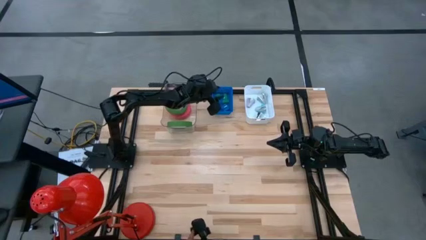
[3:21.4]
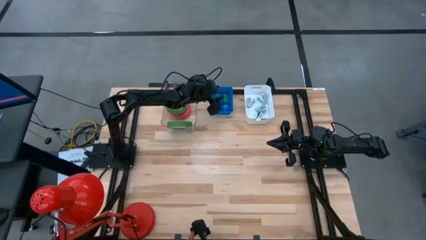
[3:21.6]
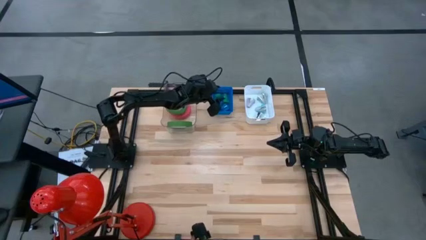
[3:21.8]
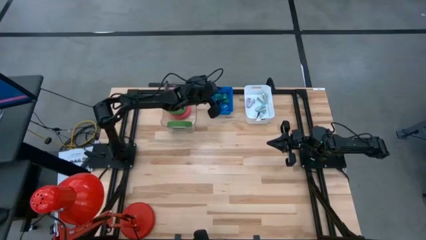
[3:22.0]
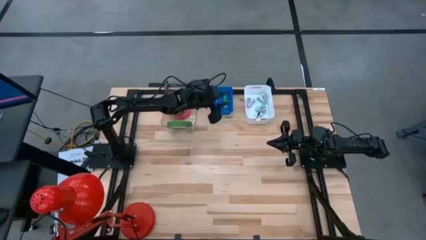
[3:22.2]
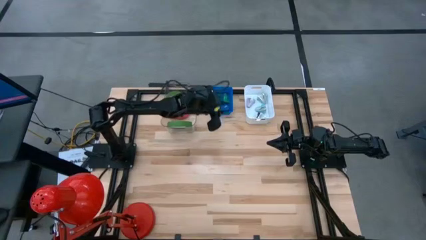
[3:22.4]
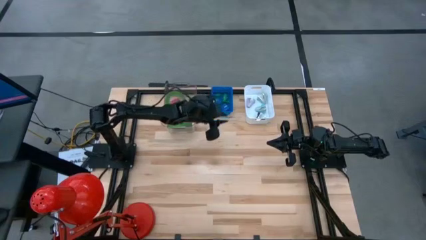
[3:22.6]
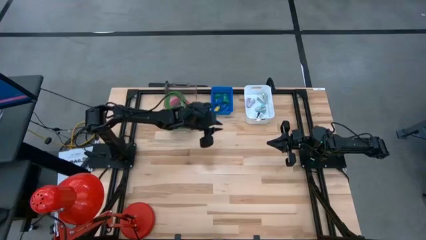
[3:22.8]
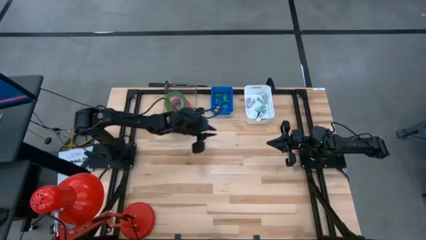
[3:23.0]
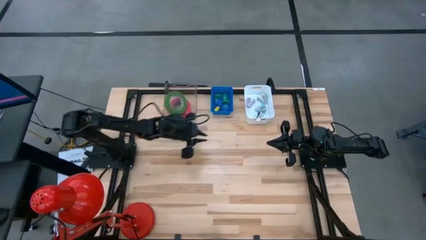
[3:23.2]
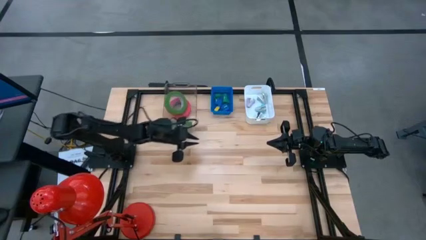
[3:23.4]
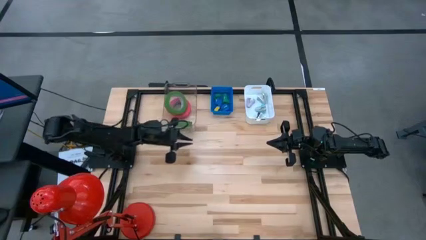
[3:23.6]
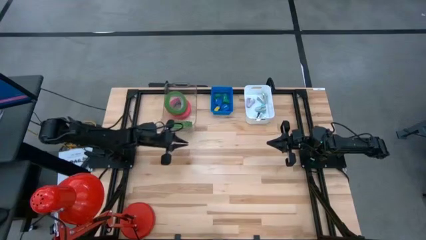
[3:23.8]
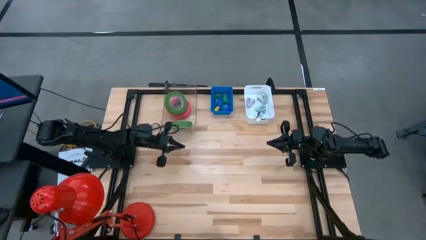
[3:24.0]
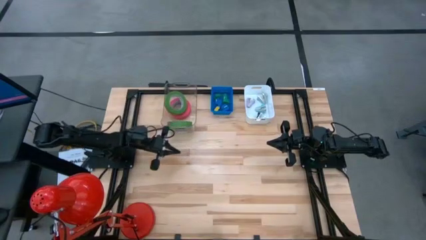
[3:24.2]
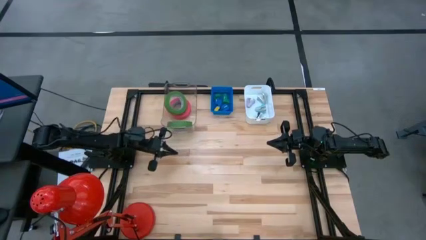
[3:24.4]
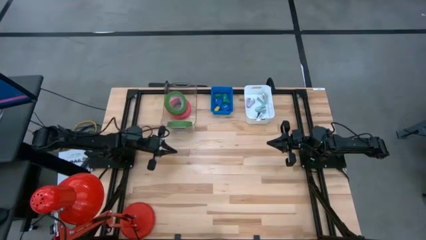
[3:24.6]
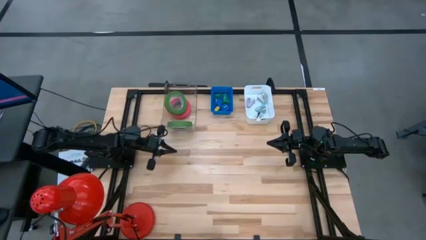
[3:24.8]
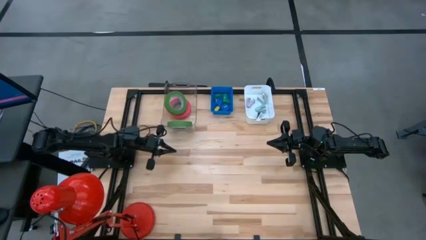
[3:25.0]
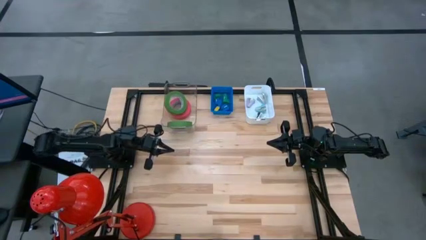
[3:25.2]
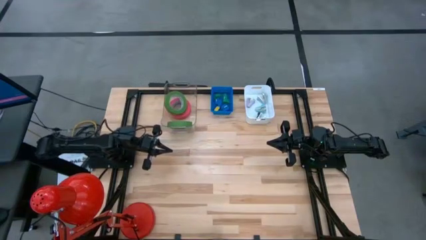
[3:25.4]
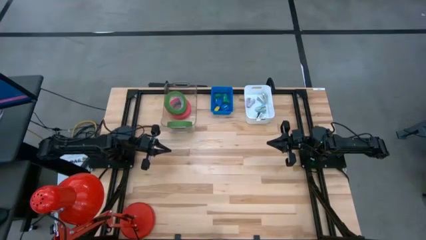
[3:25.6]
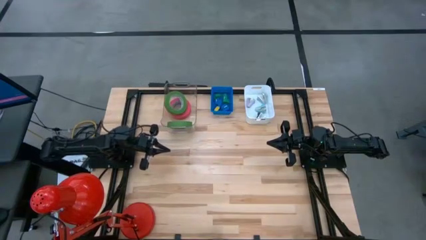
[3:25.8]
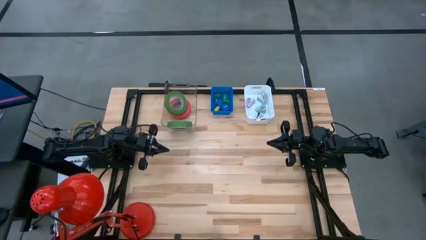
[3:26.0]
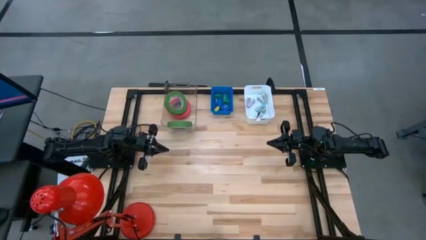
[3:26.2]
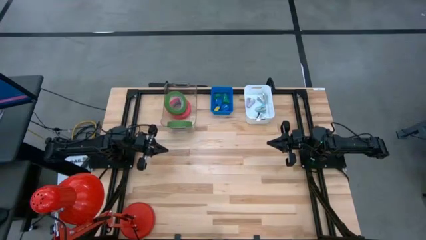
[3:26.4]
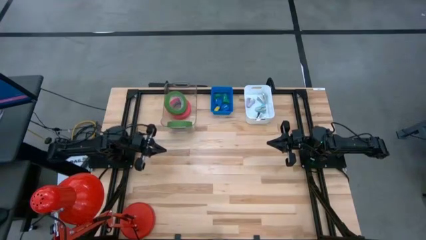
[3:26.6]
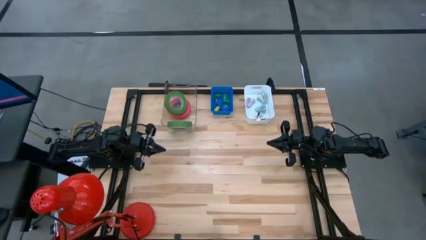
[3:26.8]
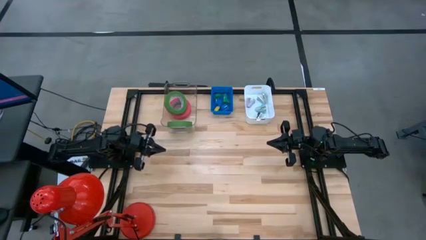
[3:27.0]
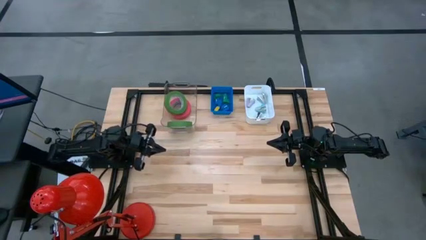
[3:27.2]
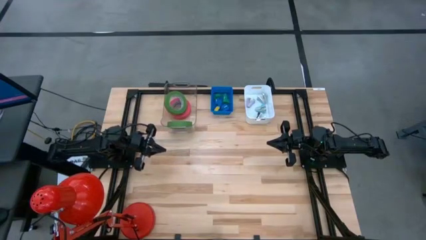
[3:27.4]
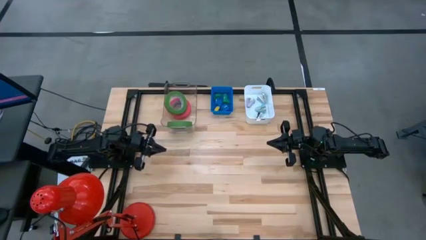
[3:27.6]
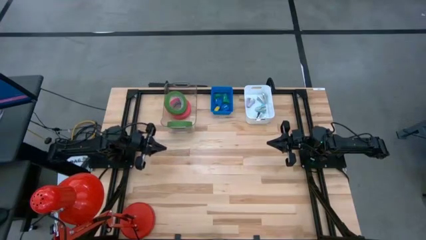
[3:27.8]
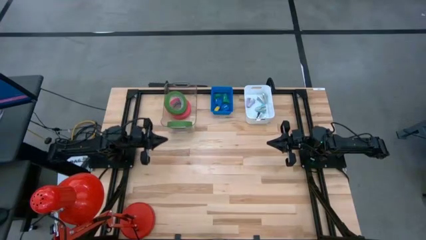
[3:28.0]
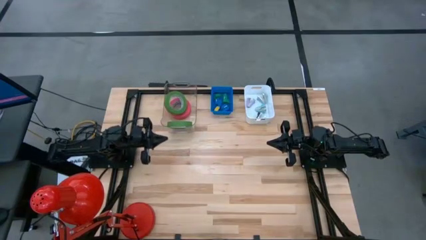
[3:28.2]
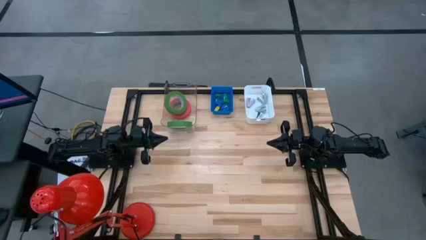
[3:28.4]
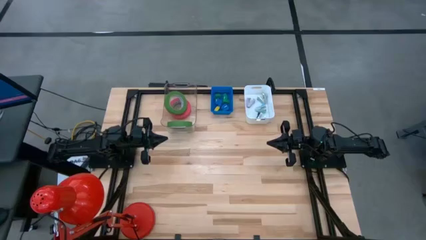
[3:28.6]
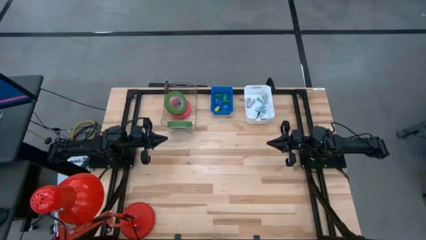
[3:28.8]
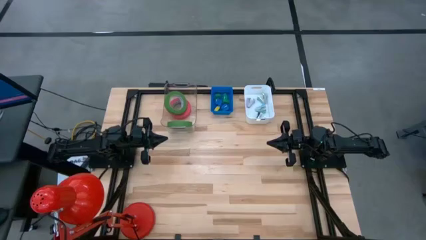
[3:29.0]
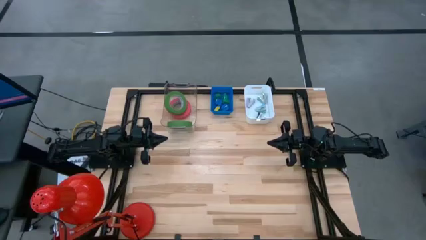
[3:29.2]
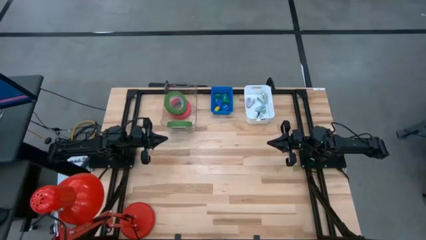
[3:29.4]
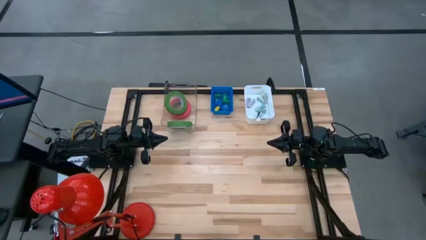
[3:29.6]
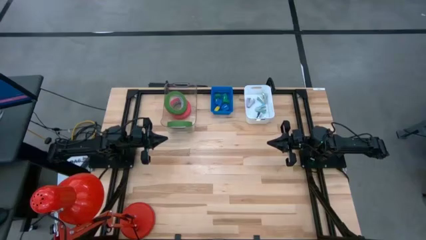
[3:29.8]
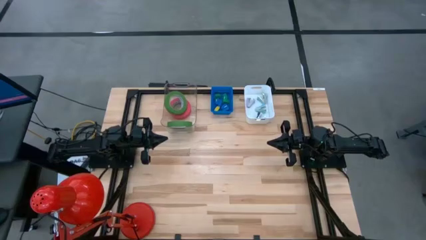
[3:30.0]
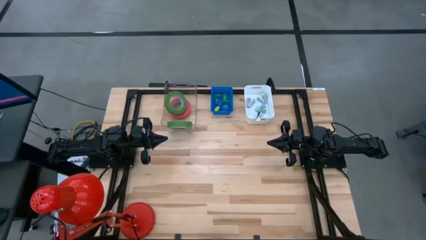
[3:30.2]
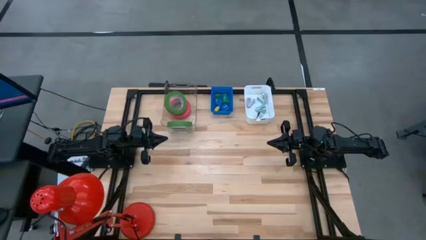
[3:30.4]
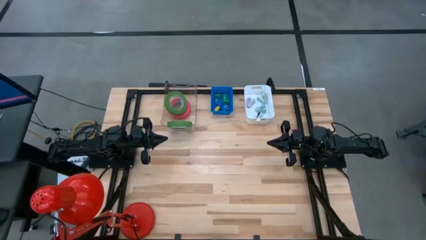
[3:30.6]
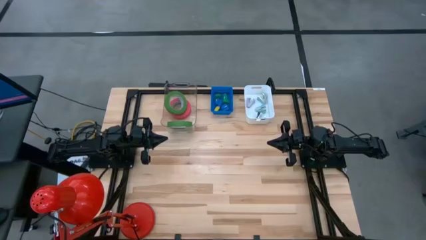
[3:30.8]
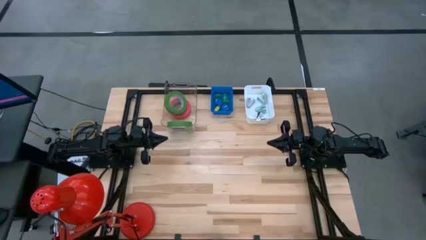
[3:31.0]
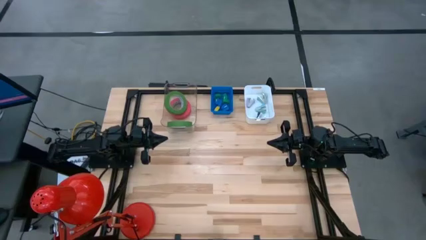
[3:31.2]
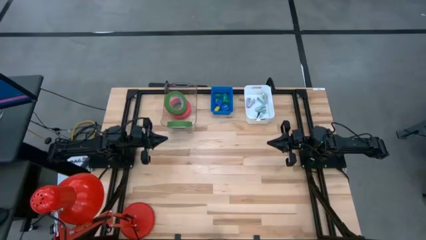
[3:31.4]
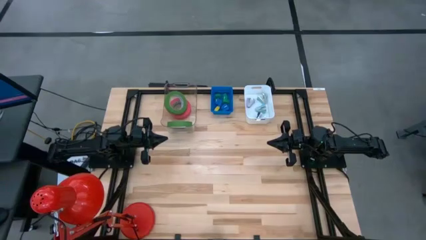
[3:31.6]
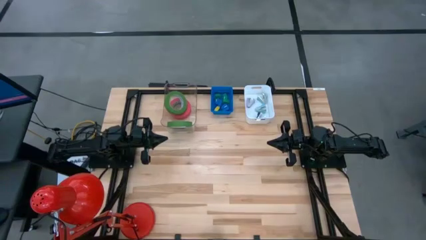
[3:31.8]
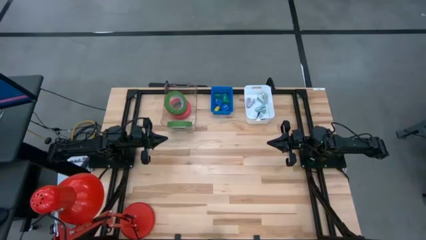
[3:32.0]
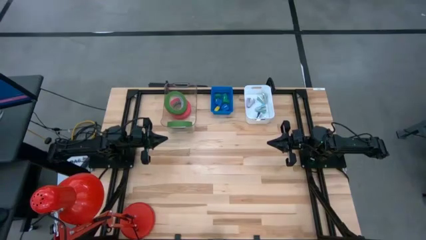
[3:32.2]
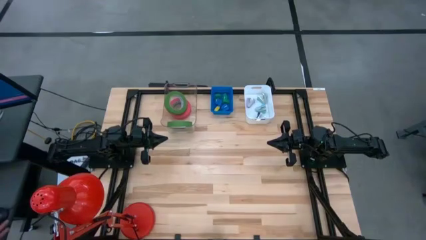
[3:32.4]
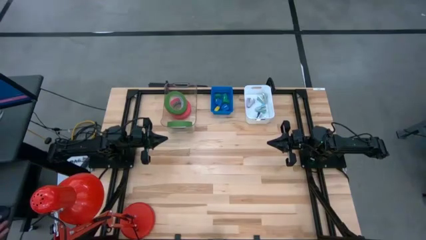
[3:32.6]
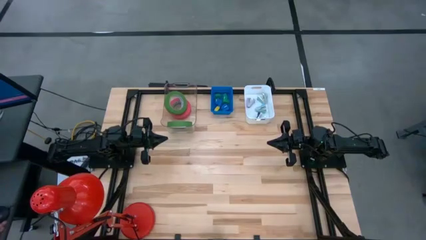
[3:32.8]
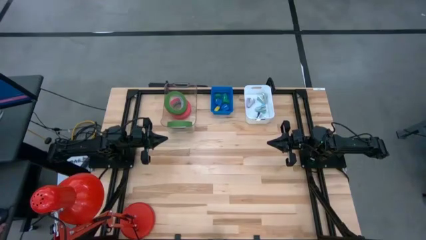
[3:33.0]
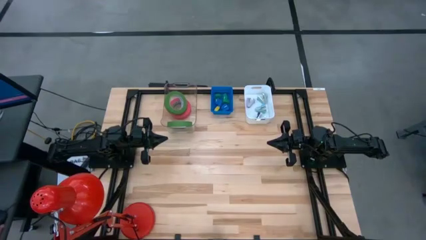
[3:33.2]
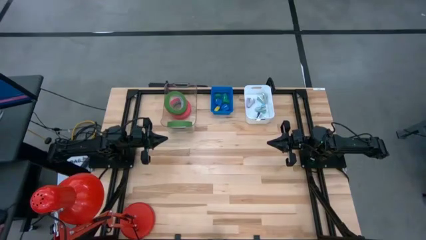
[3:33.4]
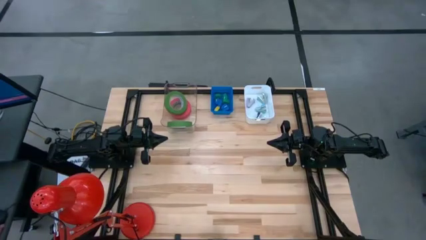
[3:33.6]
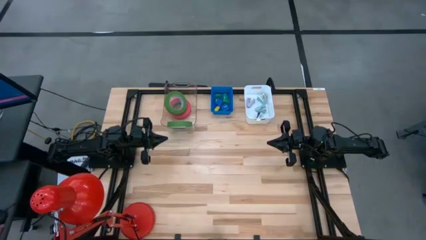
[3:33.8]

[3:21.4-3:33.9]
Task: Pick and place Stapler, Stapler remover, tape
Return to Home Position
